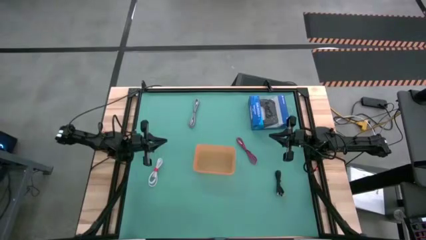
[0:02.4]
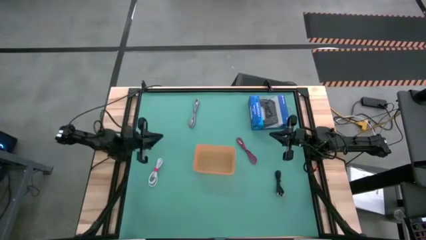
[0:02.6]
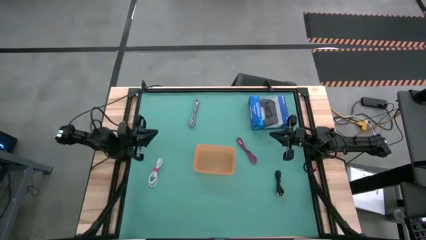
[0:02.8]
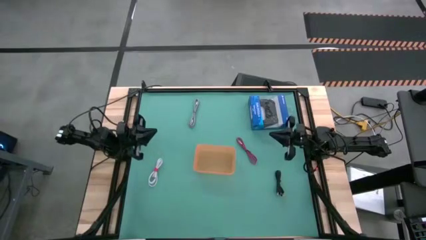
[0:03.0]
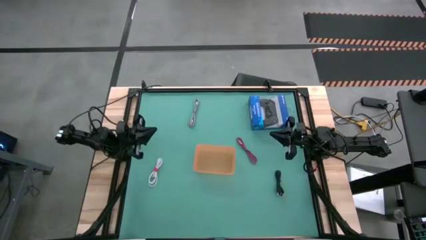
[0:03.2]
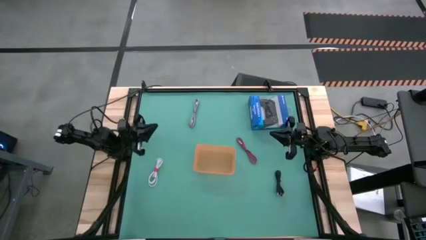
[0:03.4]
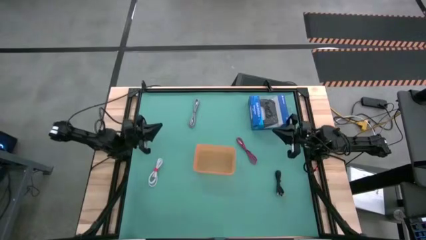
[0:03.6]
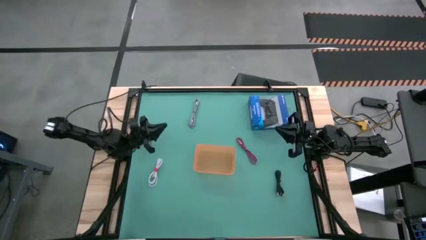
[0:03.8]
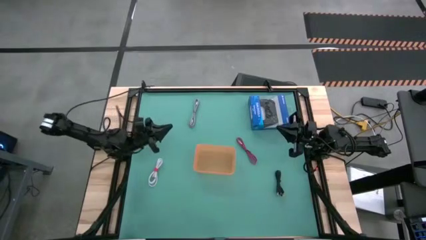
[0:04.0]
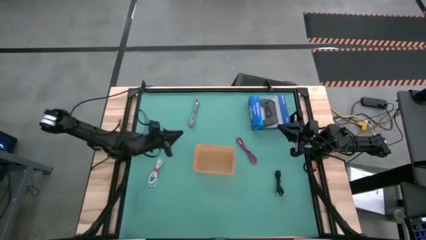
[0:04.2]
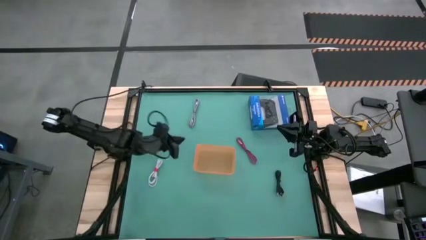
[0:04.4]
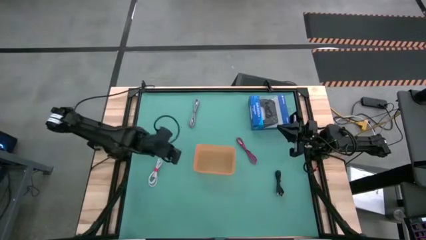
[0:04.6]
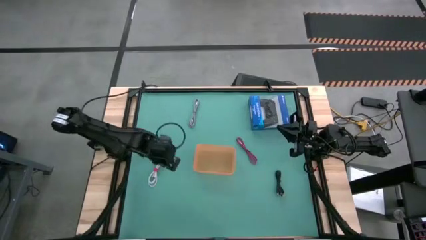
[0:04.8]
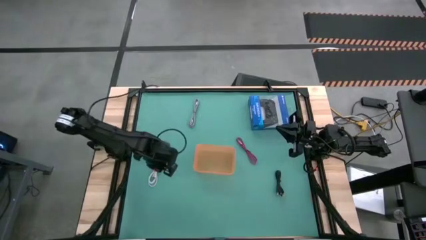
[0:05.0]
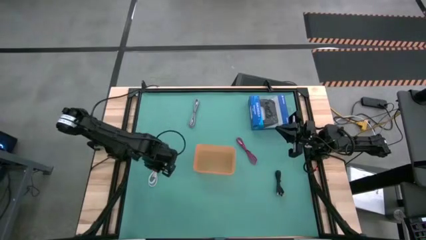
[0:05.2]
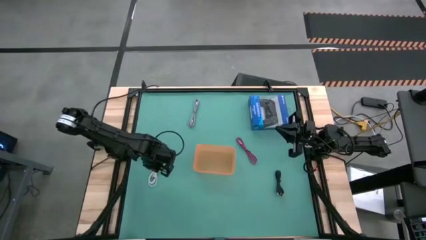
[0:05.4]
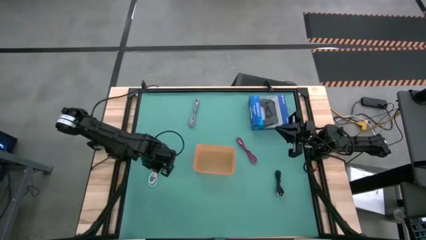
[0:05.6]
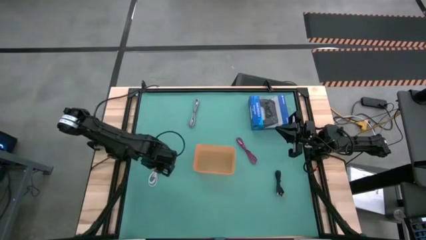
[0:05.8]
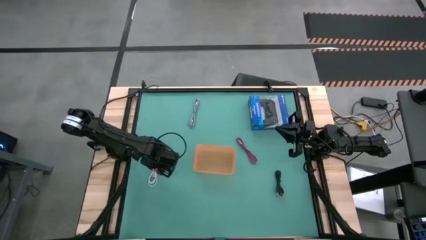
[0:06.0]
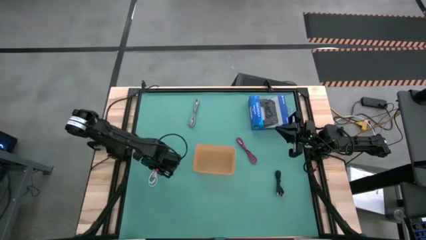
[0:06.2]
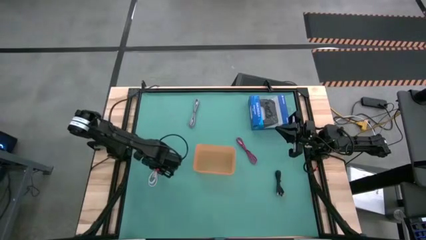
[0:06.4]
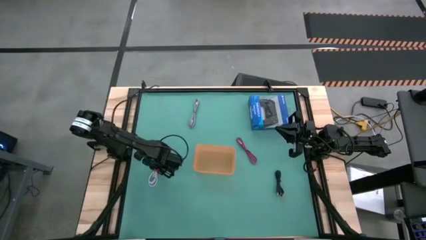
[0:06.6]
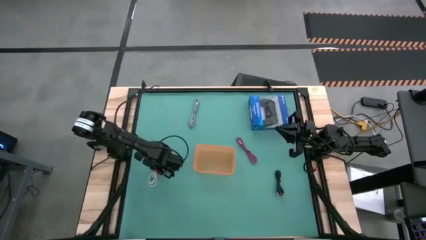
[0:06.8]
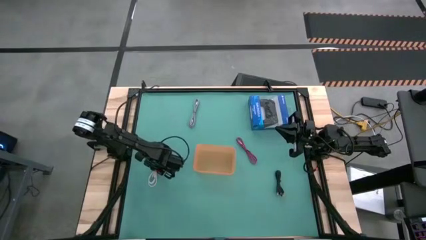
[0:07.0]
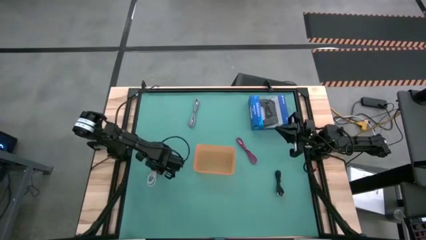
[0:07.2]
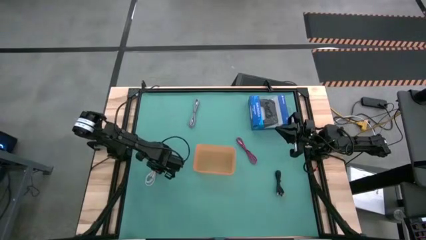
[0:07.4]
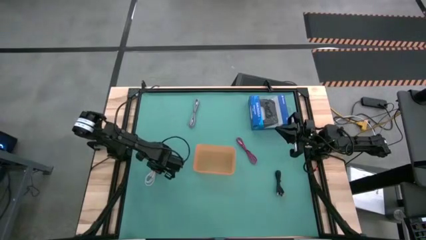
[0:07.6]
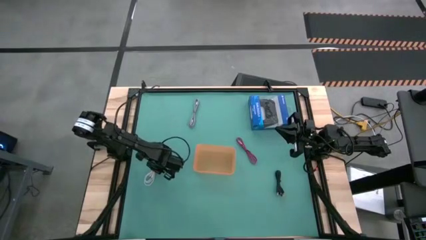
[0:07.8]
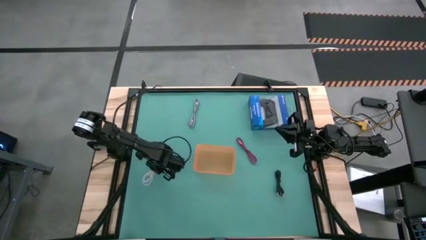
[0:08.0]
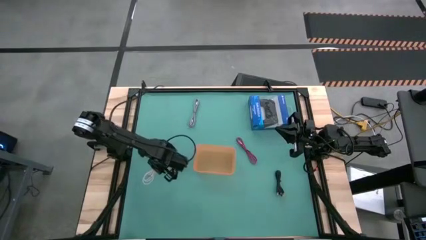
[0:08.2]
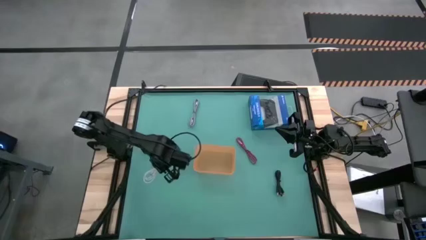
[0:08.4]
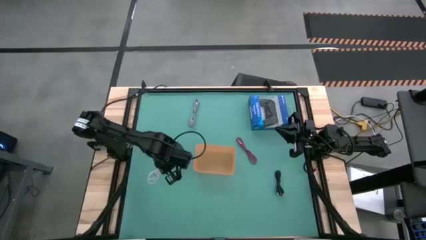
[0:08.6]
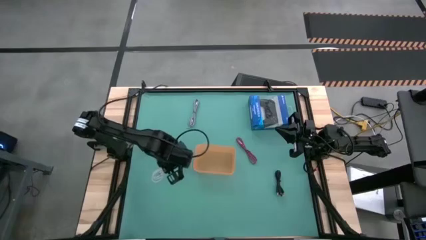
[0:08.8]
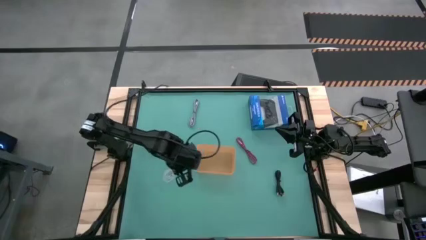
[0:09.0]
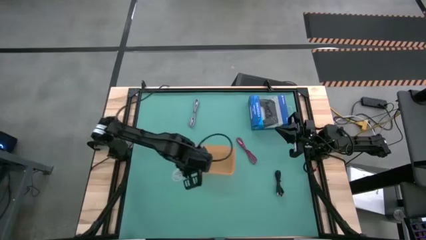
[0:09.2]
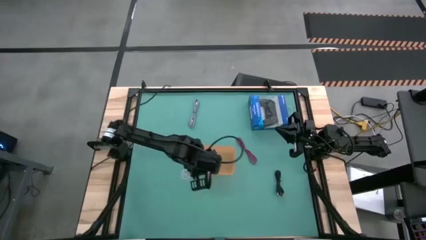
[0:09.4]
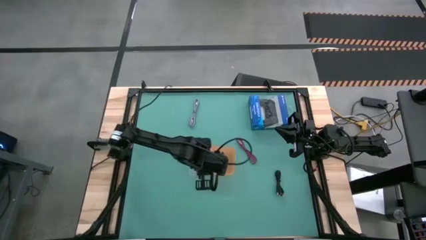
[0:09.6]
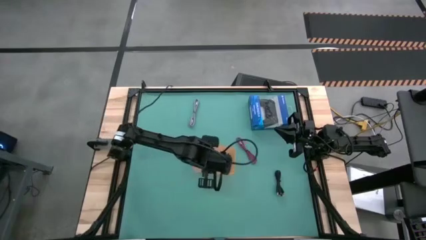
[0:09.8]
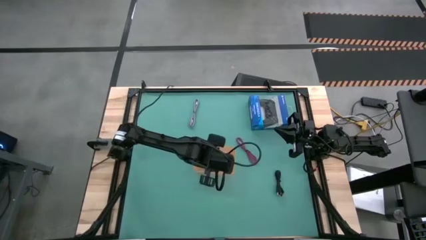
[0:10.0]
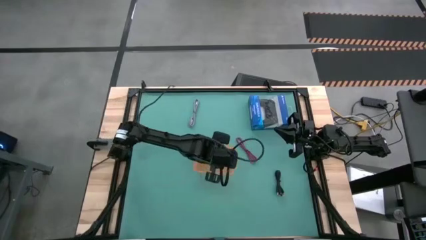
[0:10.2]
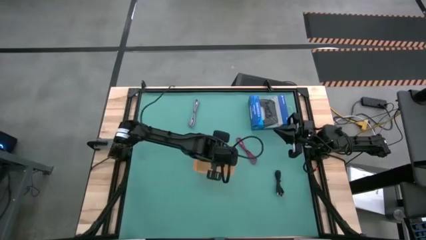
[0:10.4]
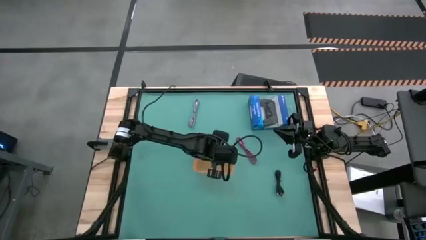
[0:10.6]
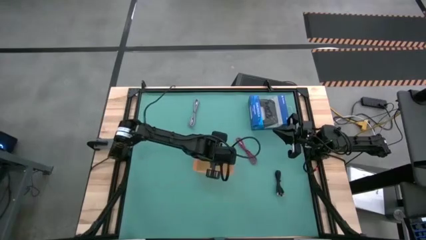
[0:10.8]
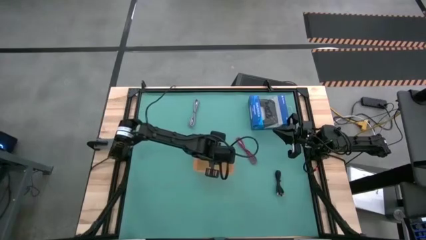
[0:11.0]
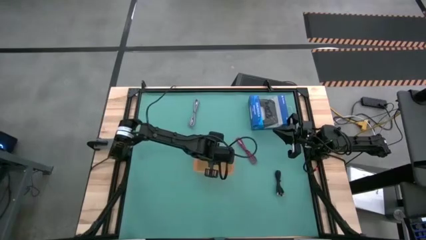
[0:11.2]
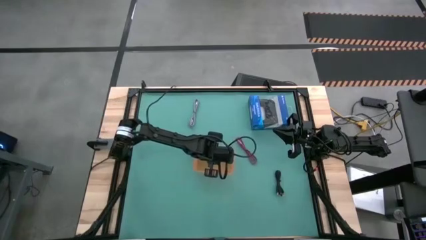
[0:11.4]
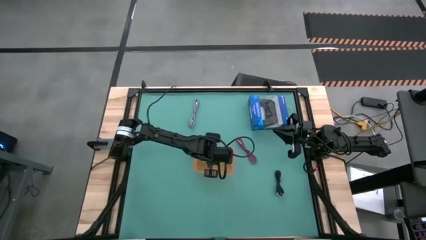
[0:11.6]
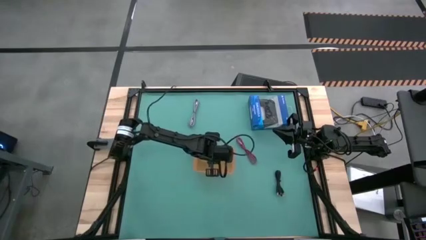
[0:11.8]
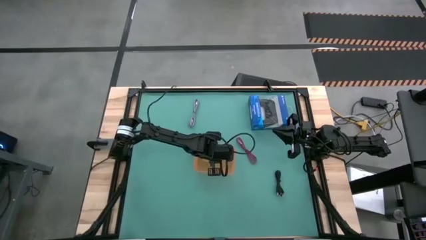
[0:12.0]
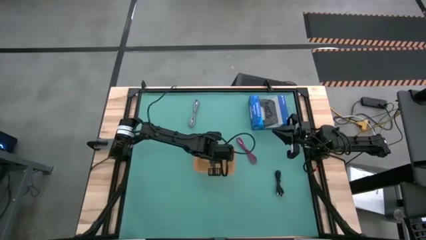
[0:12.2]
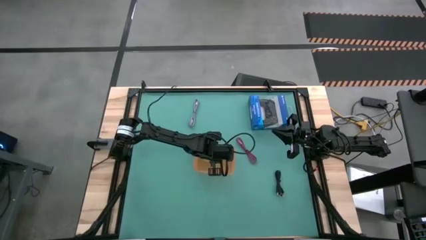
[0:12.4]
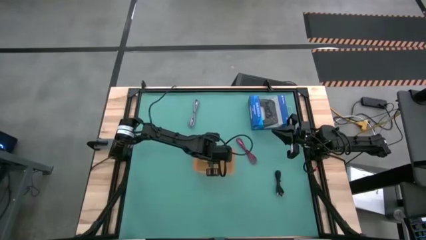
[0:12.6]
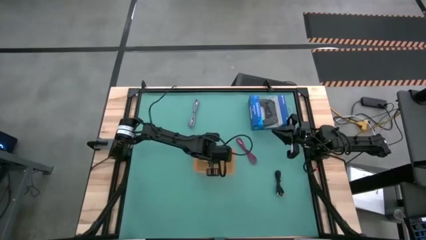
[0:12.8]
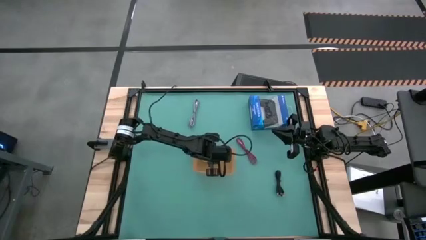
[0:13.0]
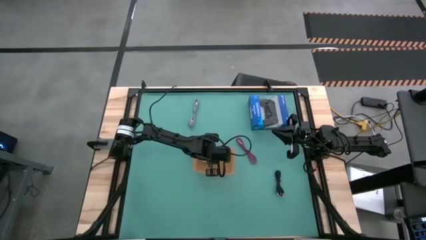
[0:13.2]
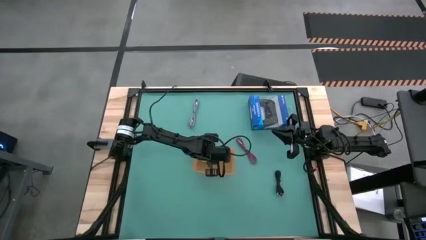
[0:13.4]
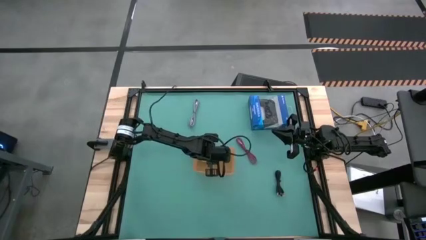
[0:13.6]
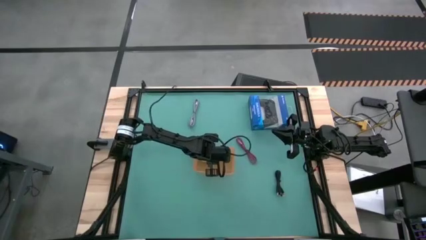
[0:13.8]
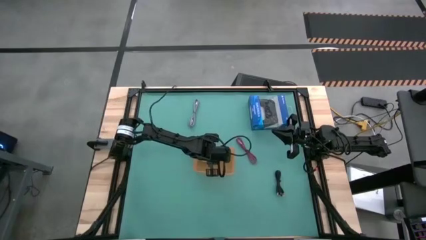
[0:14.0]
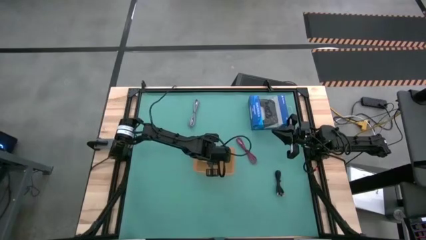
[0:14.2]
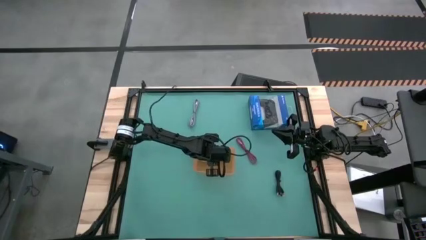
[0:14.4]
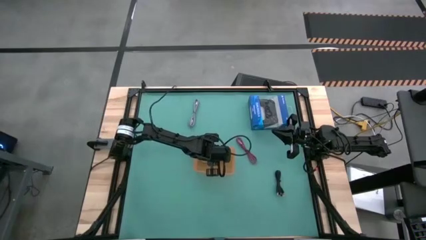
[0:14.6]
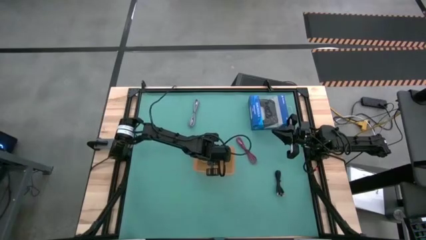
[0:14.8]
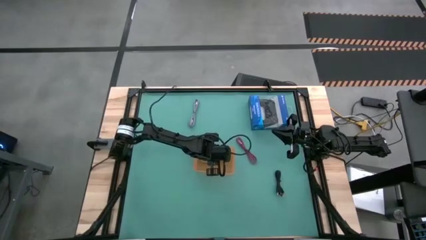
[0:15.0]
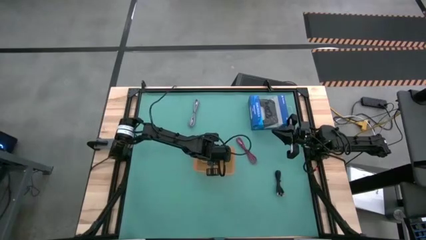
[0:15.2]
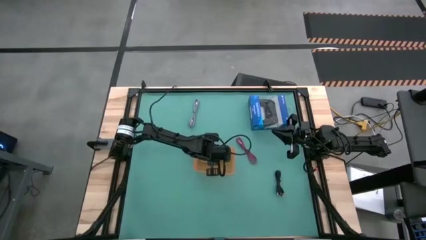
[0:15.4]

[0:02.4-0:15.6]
Task: Pick and place USB-C Cables
Put the white charger cable into the orange bin
